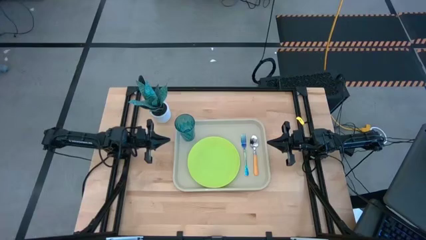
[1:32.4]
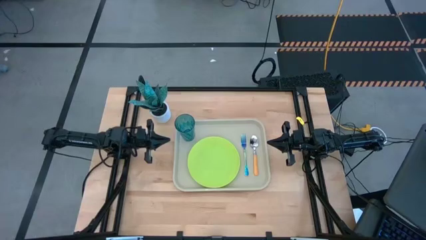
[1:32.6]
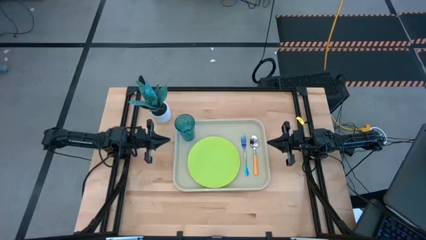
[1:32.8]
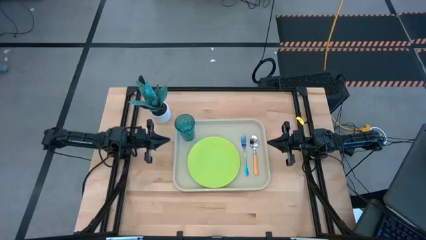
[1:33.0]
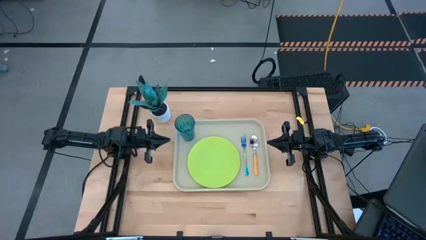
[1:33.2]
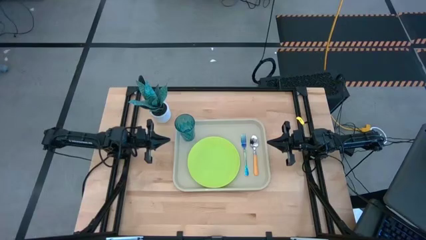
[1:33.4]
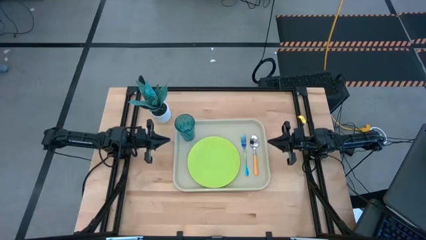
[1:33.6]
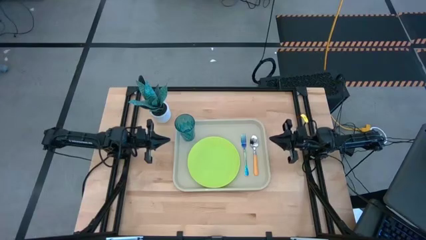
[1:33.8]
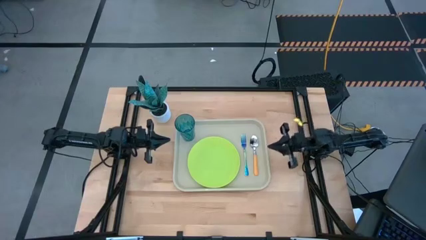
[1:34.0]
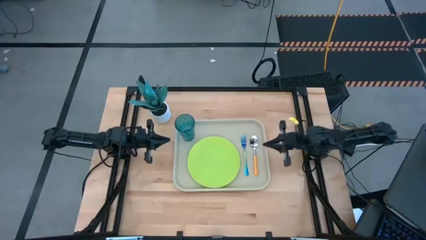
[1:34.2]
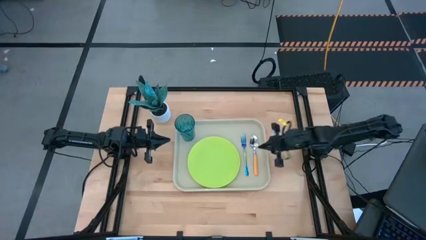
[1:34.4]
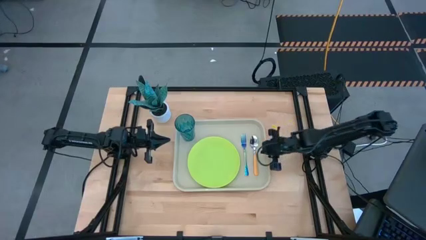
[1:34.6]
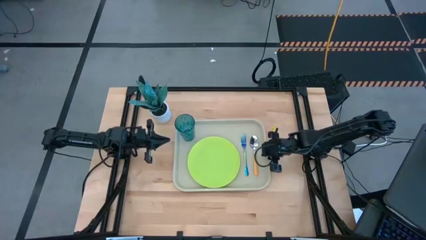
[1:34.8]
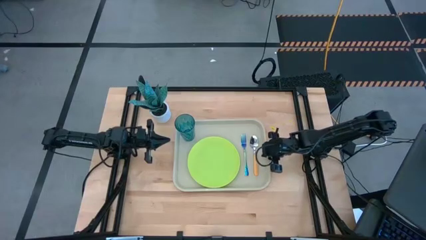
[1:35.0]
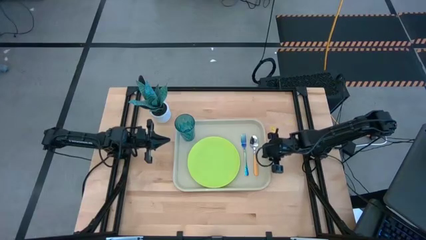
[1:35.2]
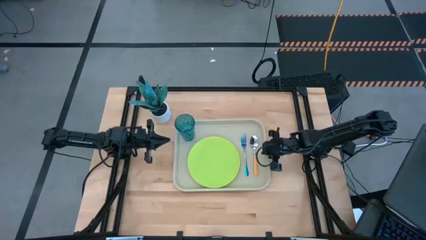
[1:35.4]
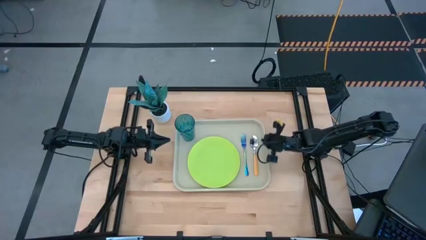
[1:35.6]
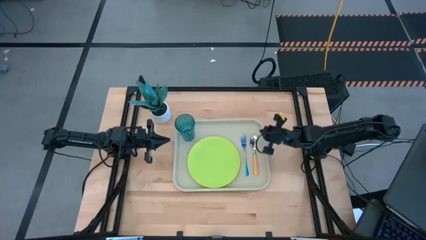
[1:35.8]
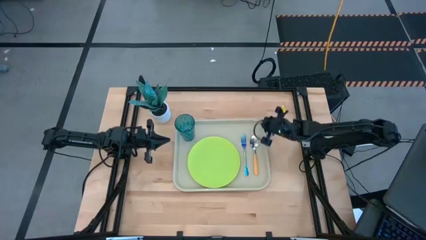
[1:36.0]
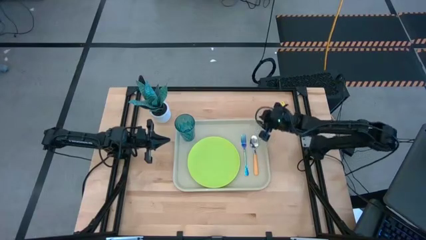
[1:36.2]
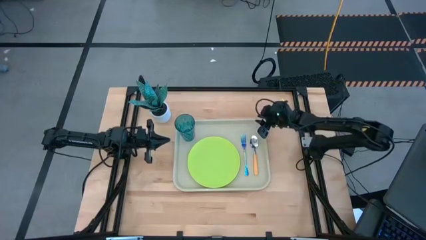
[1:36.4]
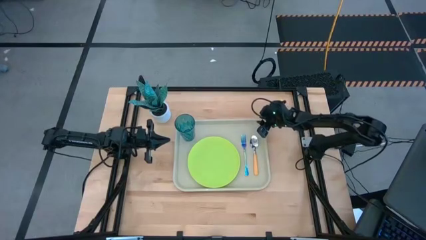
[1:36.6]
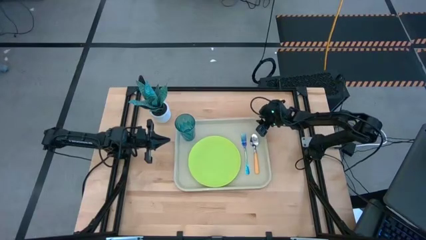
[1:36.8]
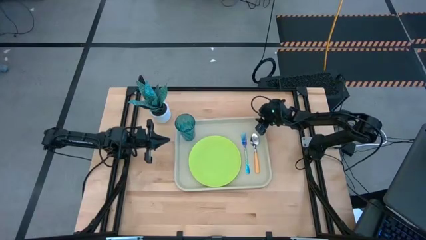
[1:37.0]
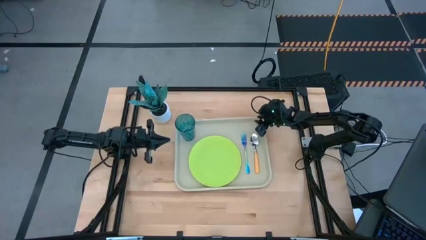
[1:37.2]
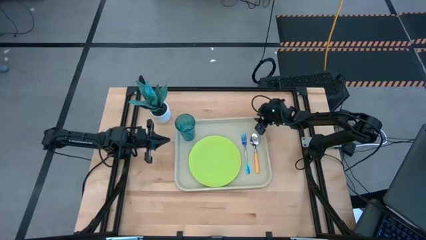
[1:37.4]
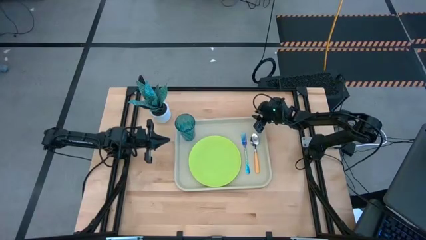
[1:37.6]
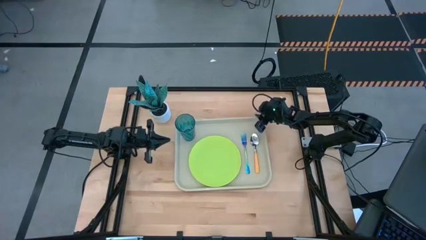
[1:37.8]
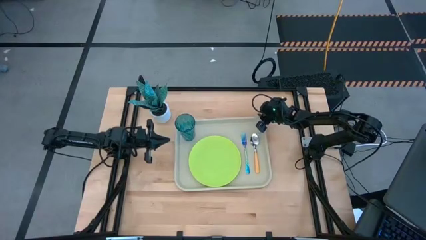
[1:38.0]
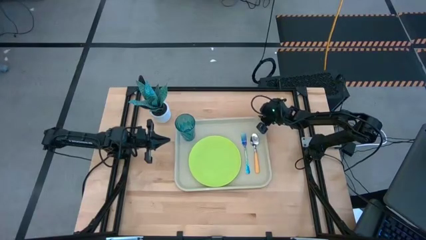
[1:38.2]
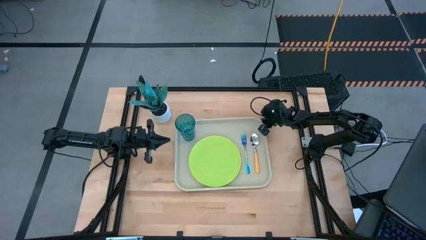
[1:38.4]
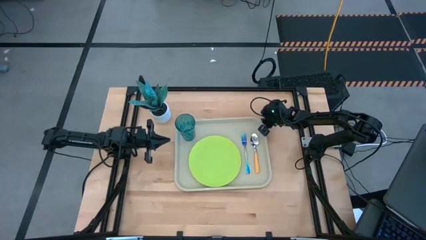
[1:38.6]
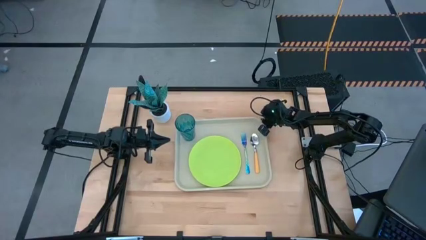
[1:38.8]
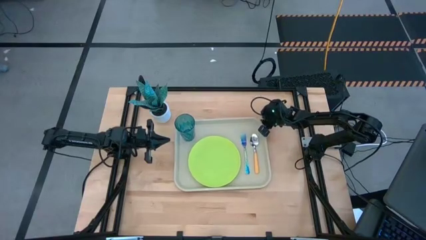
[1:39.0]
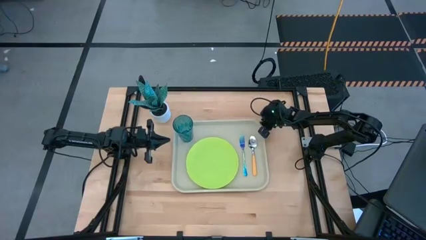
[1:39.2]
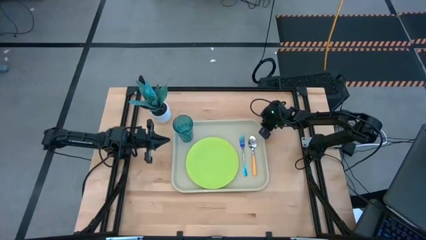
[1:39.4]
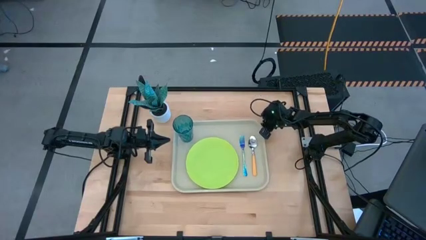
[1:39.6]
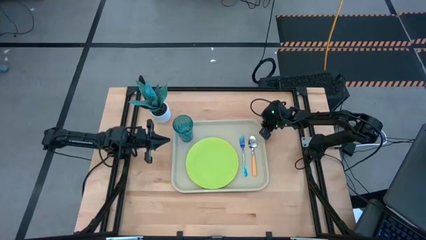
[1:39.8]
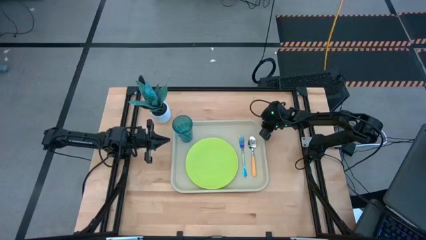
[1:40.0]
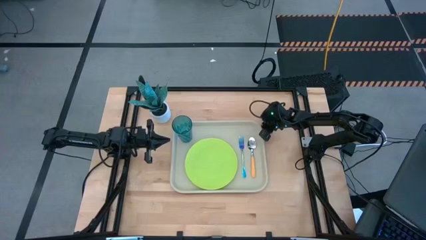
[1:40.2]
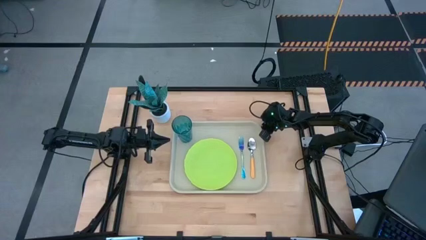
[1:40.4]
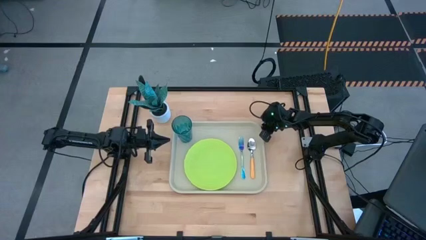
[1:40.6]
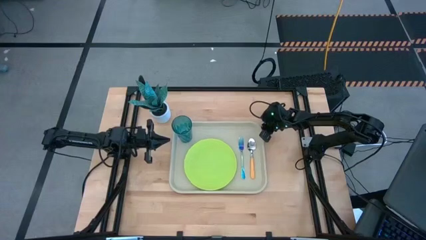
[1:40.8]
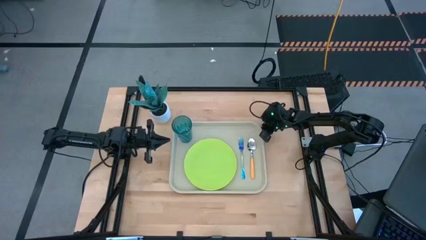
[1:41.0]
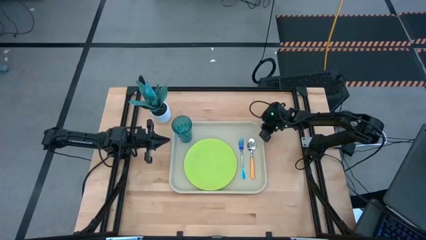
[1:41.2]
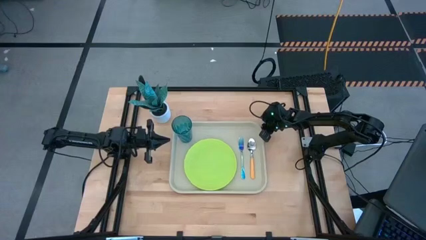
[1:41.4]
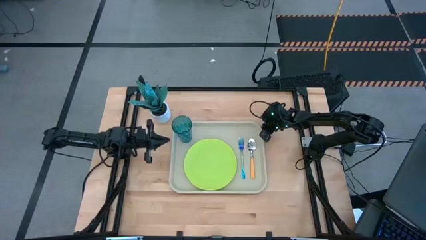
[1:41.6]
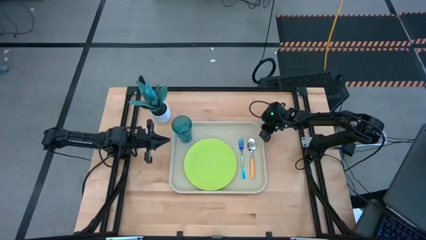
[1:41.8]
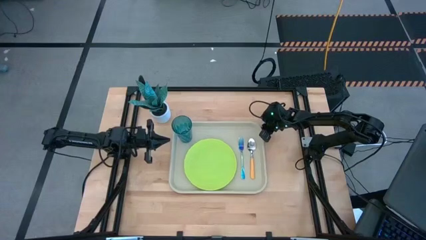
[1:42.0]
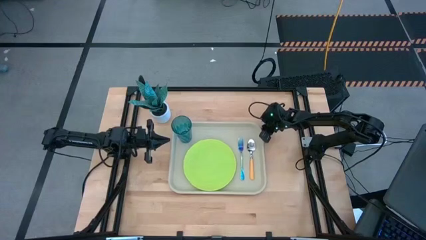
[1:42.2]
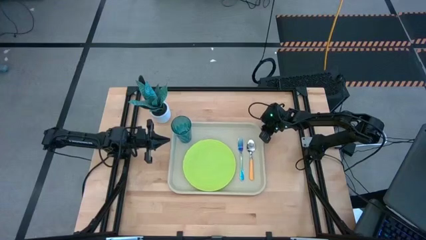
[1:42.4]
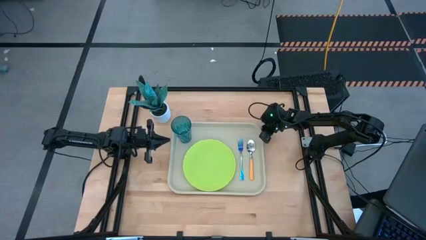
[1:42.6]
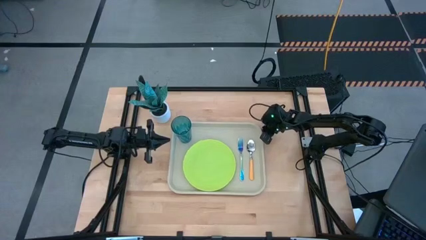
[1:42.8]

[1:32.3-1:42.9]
Task: Pick and place plate/cup/fork/spoon on tray
Adjust the white food tray

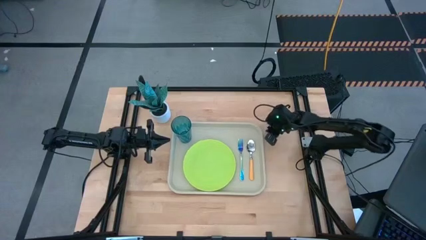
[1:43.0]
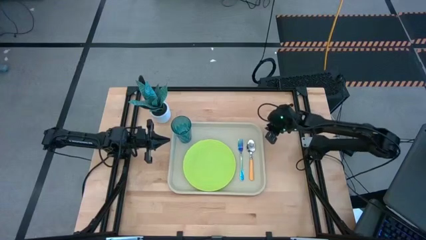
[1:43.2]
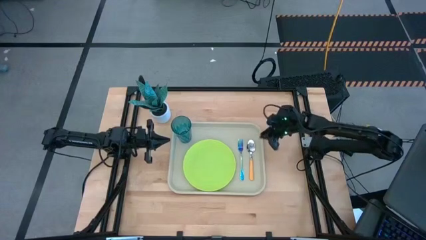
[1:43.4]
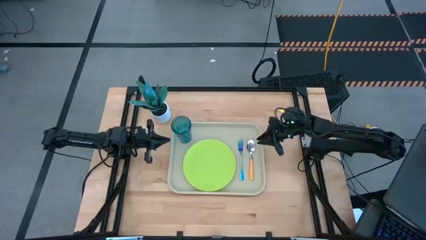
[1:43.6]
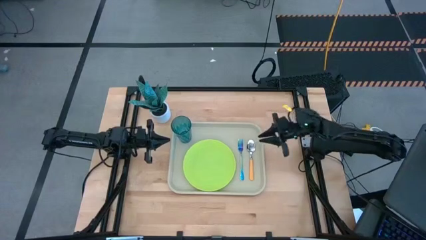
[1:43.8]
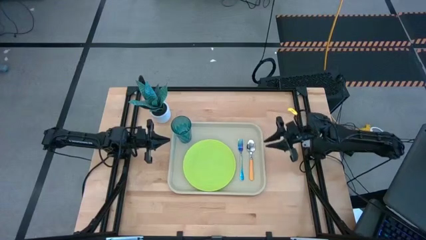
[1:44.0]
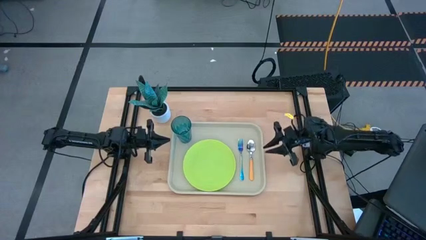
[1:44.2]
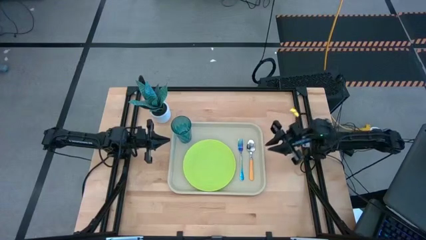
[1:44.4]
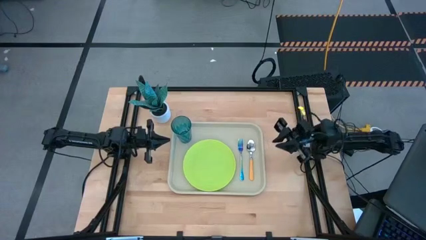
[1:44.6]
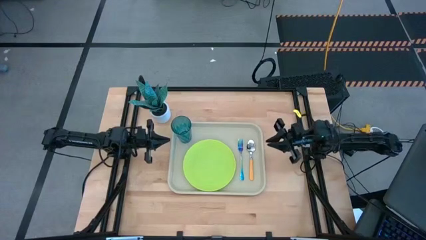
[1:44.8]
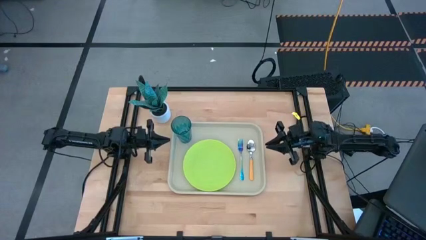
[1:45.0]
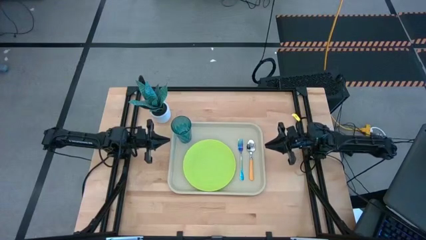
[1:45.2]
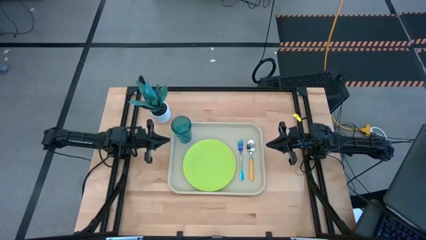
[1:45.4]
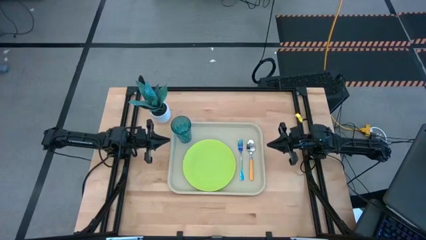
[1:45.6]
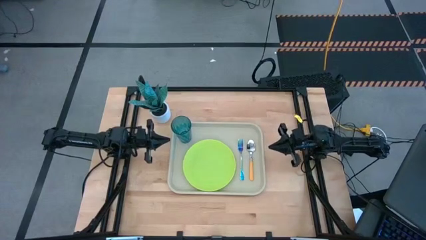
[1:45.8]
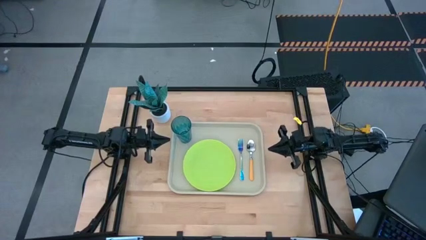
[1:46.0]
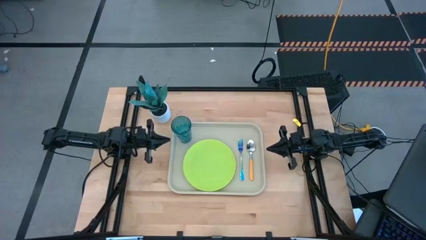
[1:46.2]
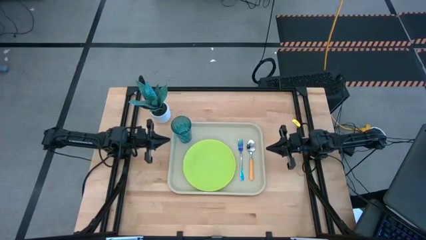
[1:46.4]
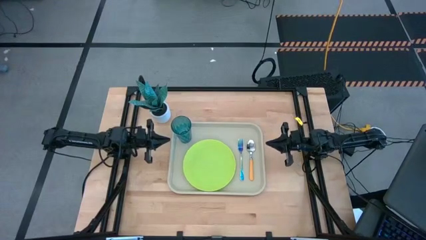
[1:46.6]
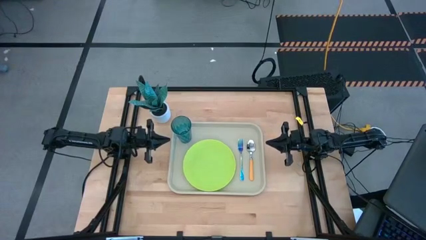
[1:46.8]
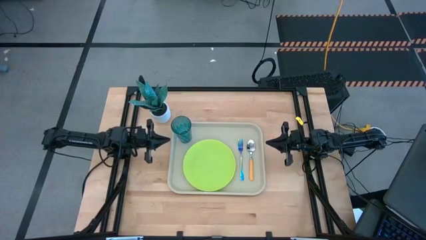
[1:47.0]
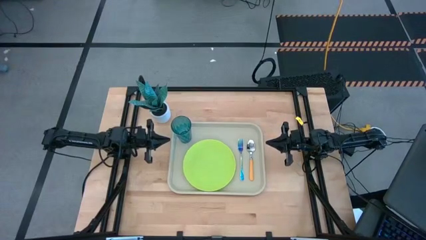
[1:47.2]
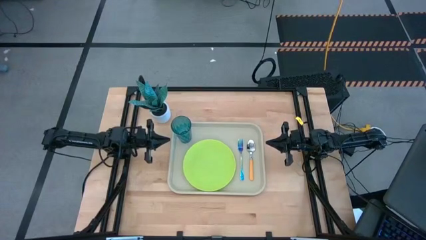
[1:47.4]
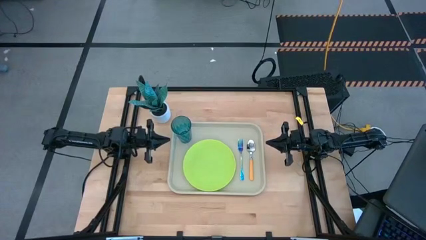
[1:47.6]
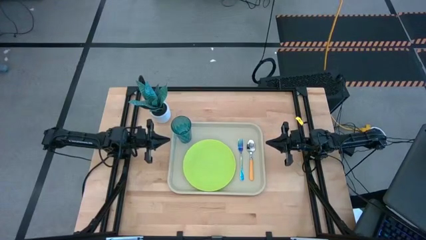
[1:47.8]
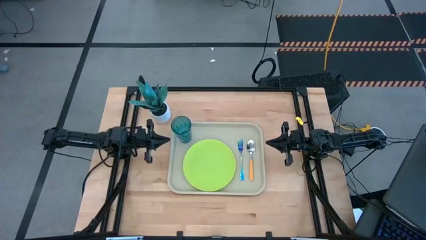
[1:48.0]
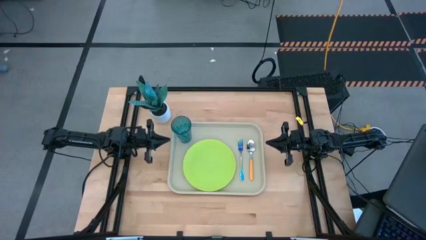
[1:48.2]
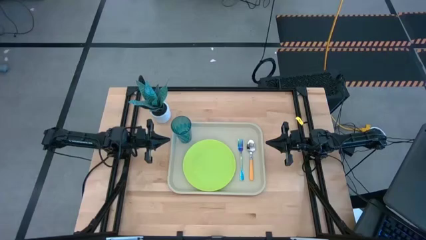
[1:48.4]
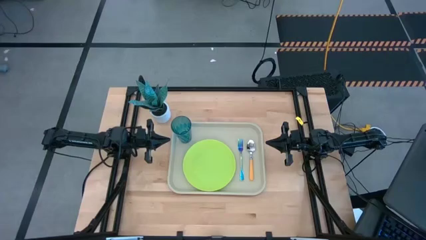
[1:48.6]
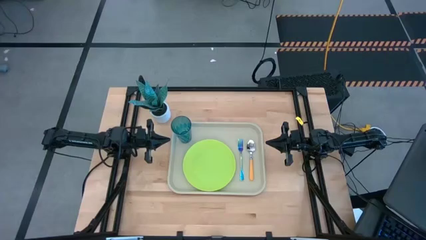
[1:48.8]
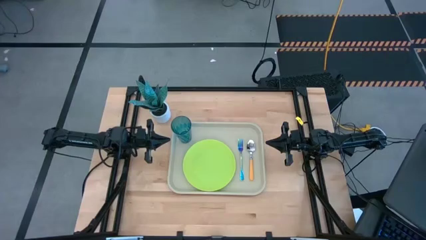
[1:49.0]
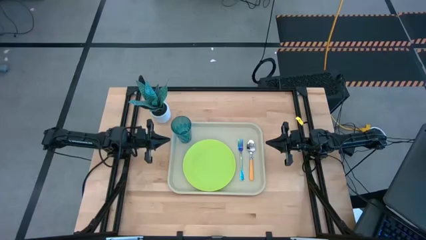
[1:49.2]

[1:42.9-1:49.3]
Return to Home Position
